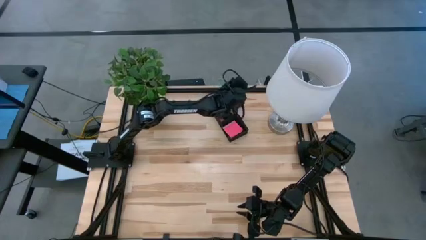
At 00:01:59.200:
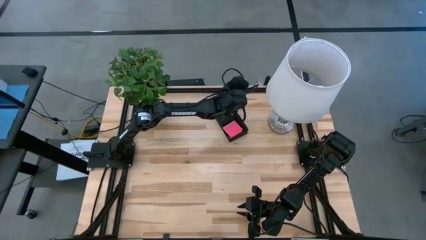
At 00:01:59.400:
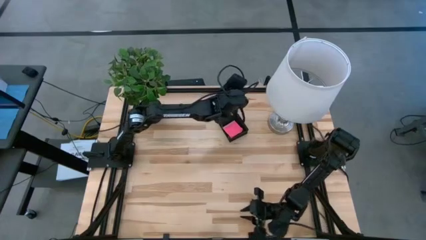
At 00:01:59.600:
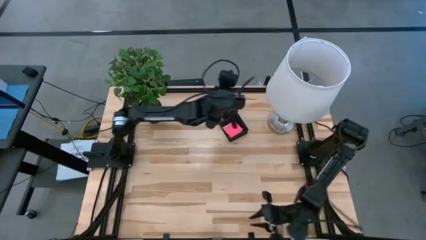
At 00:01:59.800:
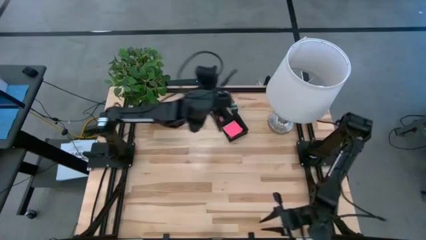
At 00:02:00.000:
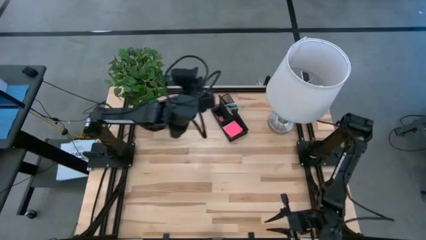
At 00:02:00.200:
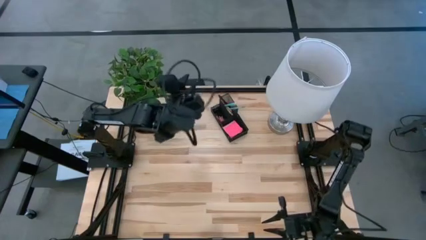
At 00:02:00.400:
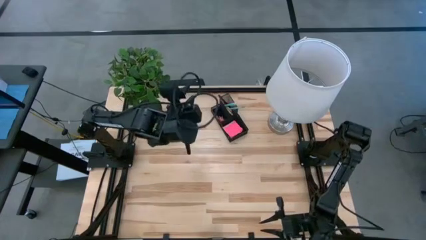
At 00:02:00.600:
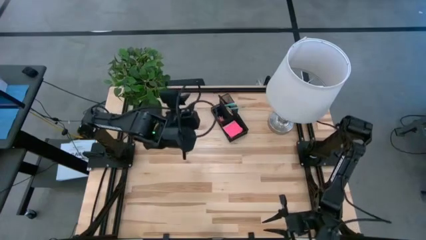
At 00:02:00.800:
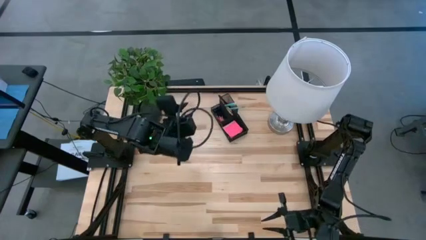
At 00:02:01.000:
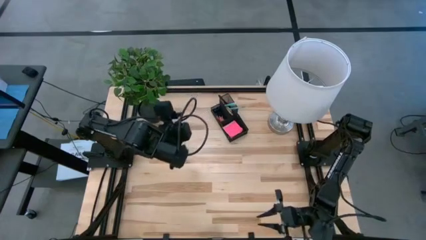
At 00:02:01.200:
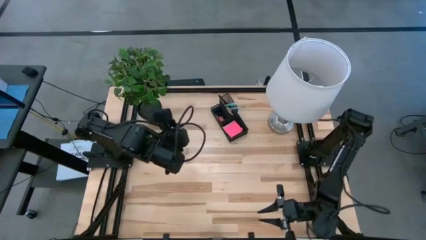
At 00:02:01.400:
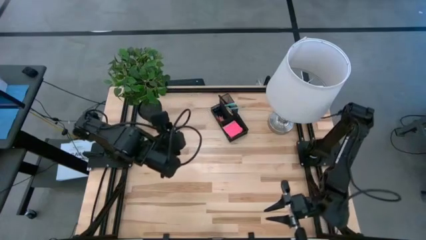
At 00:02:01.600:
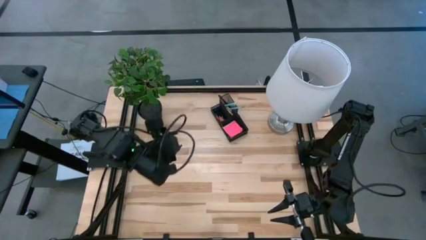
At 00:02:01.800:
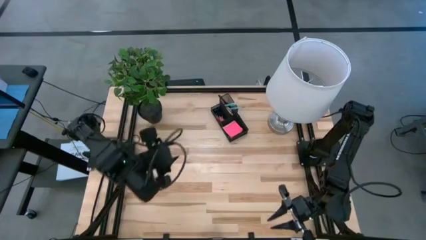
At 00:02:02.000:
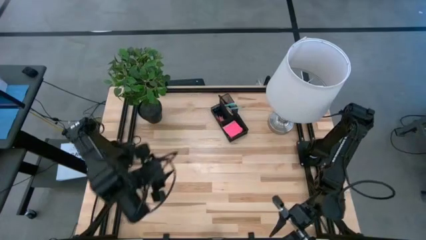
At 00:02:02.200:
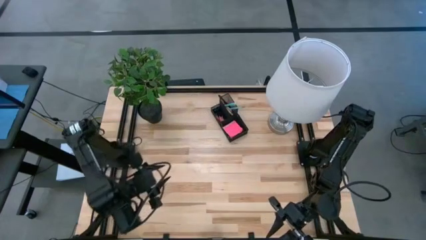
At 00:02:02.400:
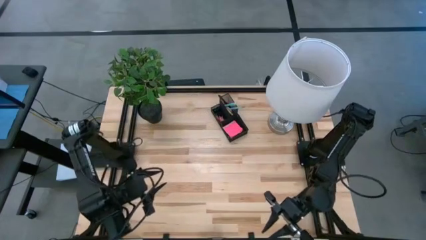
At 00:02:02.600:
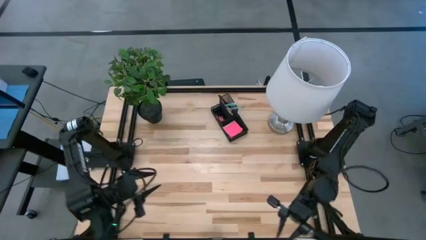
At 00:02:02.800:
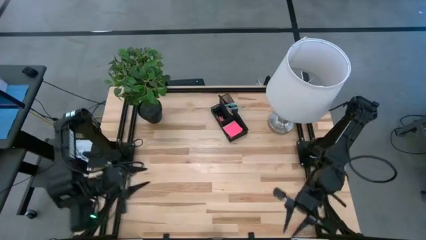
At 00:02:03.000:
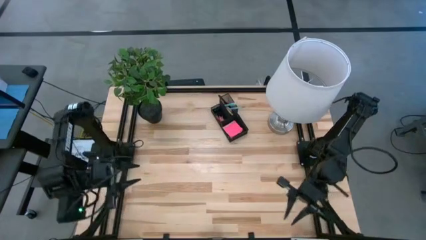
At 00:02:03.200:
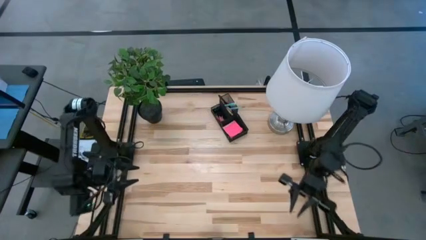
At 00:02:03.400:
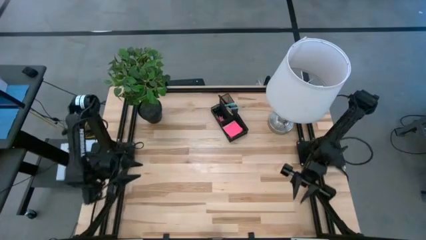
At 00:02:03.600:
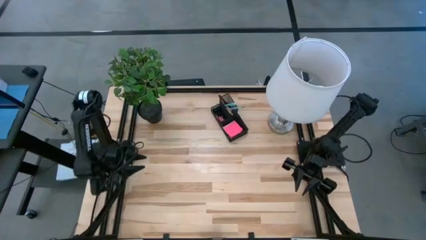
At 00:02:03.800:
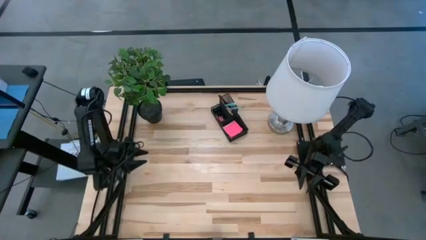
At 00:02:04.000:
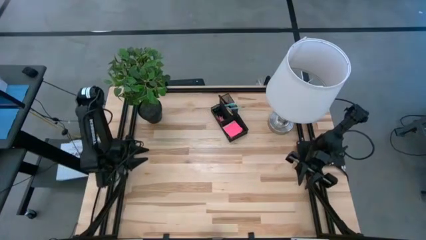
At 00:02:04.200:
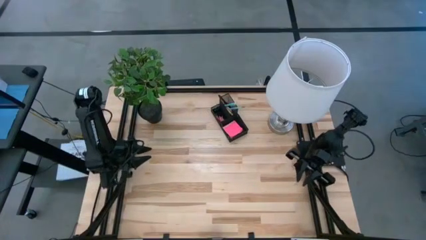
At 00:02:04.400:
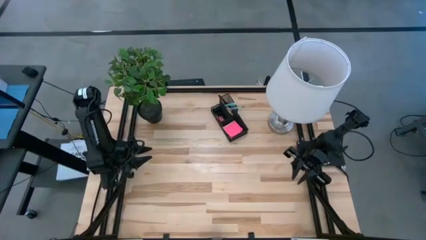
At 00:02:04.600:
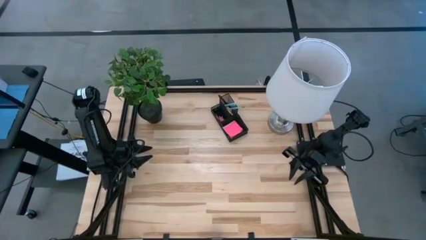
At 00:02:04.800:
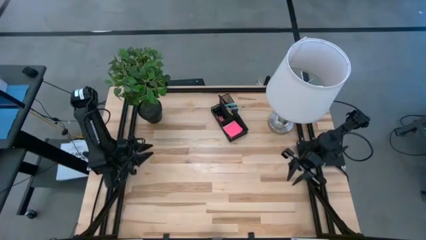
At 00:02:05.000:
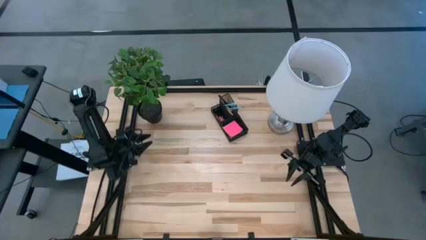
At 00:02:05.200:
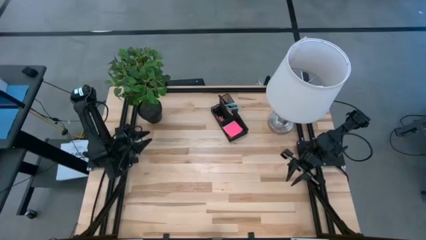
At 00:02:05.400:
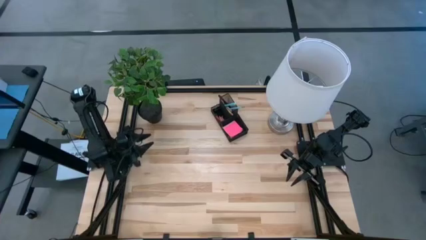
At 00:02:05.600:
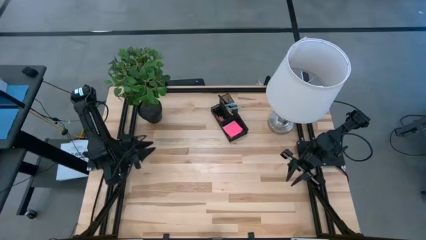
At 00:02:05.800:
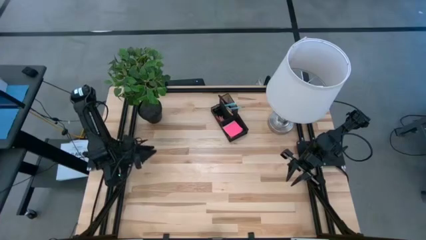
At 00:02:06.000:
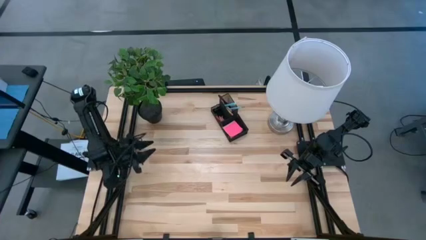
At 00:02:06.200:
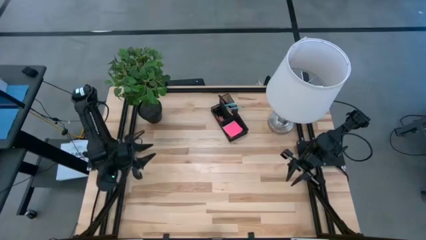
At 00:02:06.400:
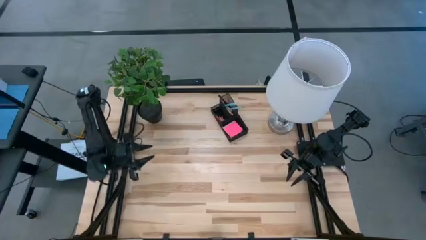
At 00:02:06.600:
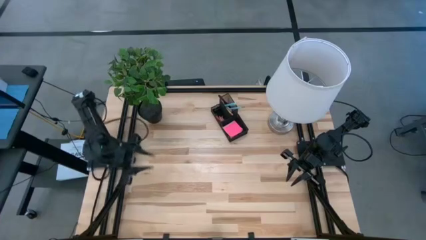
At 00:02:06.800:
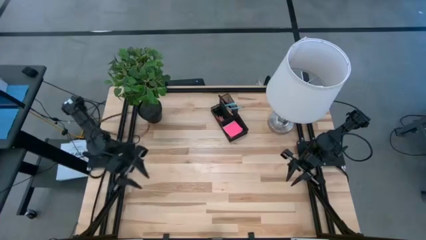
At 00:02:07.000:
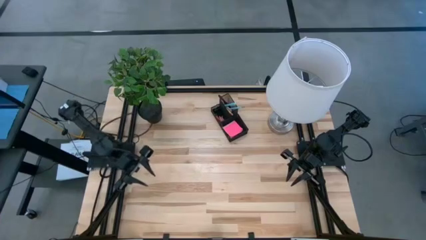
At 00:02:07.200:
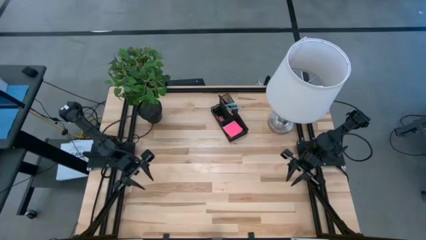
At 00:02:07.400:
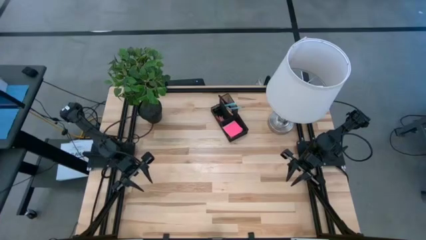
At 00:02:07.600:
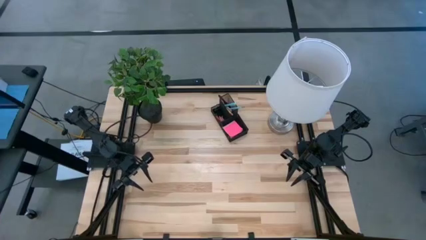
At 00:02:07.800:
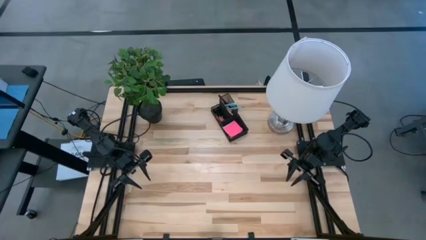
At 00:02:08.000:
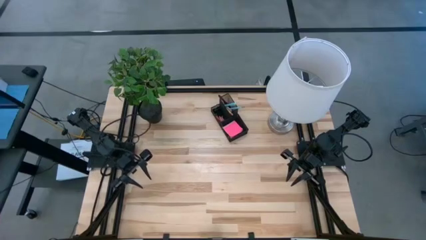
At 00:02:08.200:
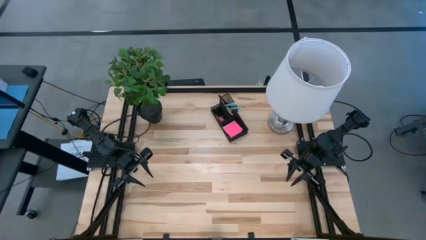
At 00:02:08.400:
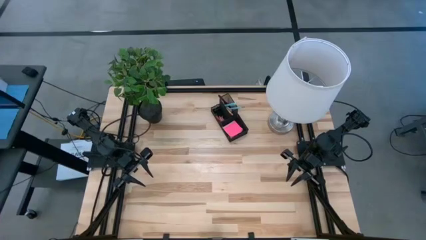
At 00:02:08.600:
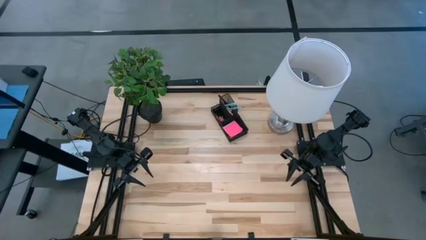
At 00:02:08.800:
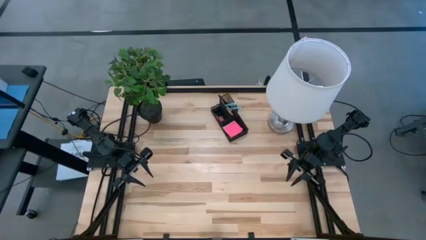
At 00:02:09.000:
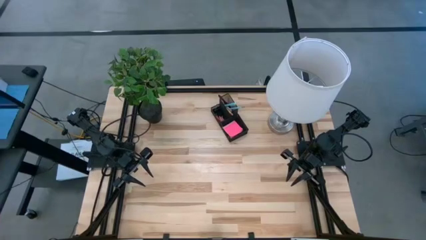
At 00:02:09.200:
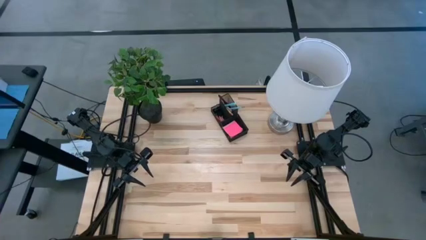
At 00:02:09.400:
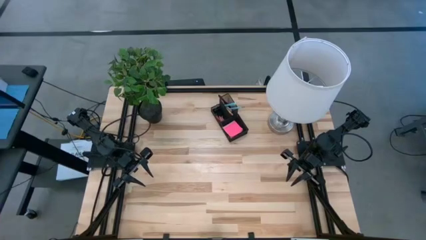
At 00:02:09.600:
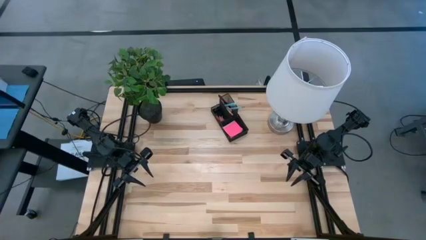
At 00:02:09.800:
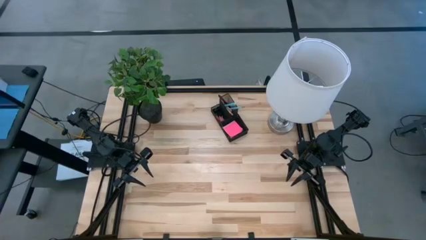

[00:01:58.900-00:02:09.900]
Task: Pick and place office supplies into organizer
Return to Home Position

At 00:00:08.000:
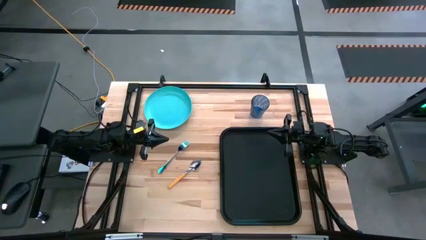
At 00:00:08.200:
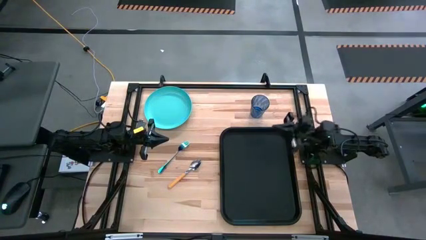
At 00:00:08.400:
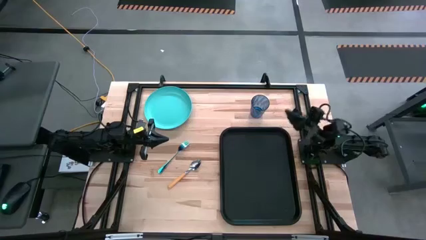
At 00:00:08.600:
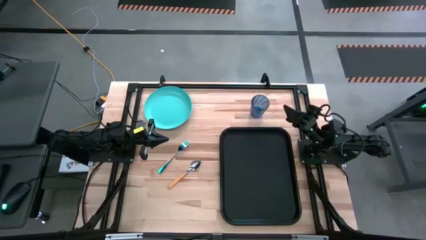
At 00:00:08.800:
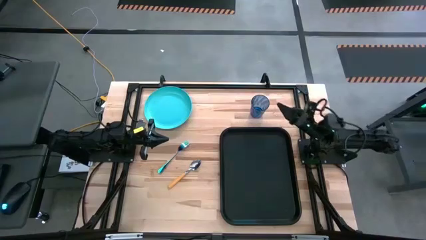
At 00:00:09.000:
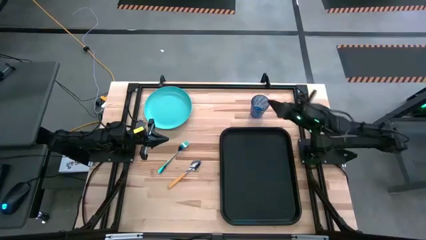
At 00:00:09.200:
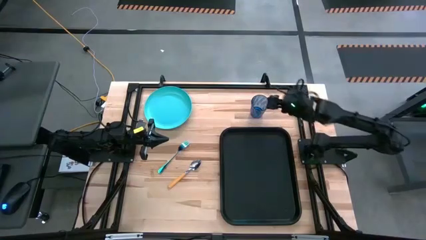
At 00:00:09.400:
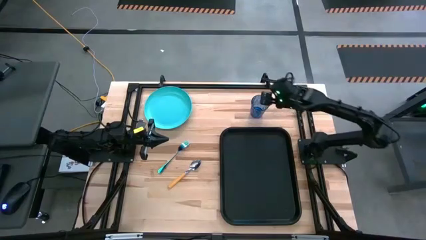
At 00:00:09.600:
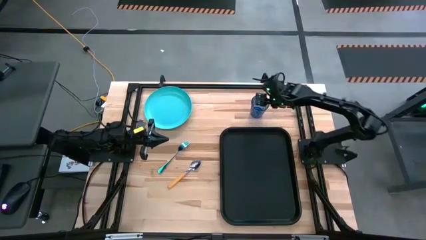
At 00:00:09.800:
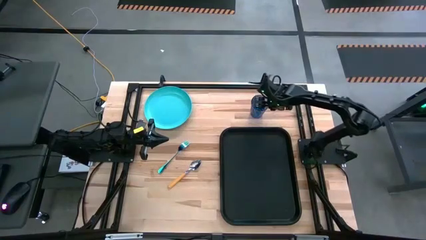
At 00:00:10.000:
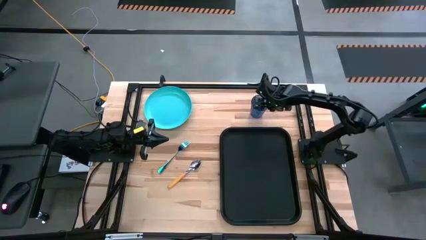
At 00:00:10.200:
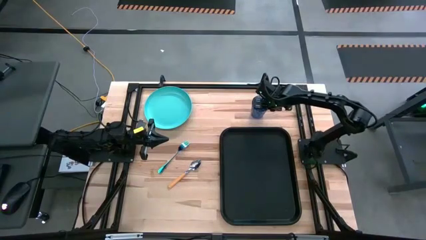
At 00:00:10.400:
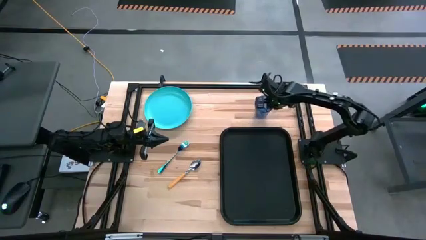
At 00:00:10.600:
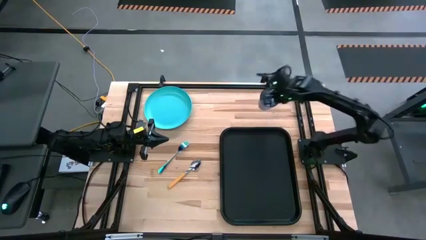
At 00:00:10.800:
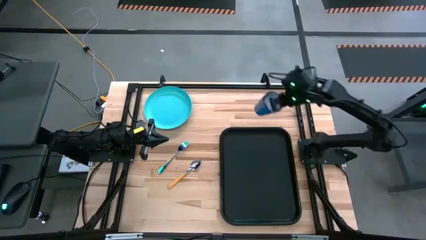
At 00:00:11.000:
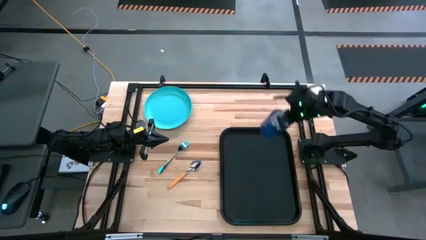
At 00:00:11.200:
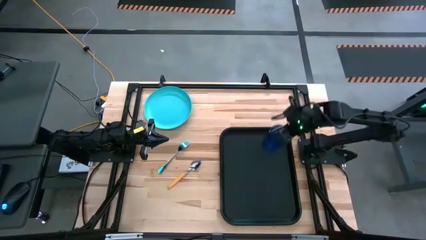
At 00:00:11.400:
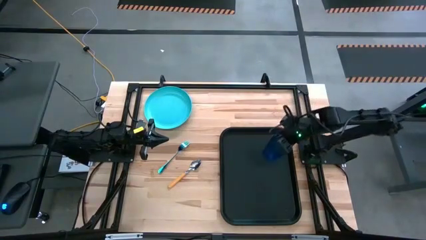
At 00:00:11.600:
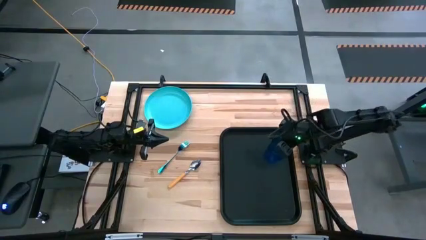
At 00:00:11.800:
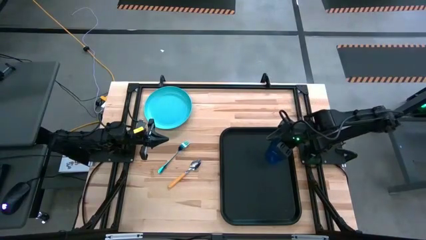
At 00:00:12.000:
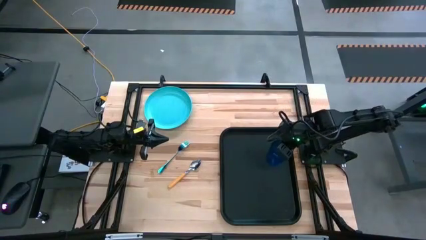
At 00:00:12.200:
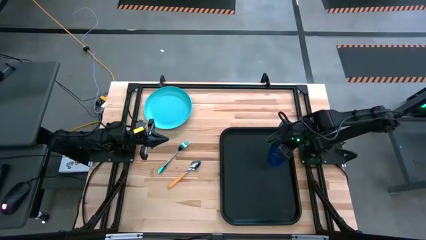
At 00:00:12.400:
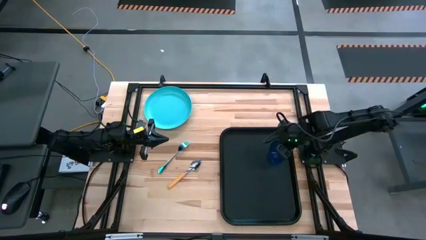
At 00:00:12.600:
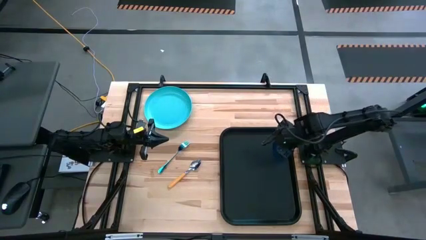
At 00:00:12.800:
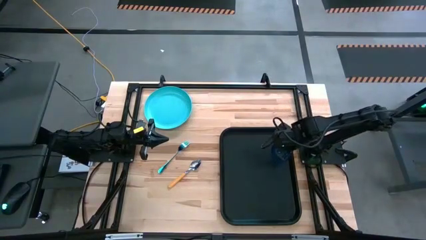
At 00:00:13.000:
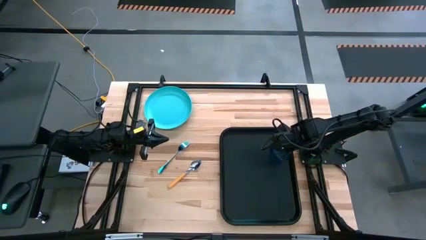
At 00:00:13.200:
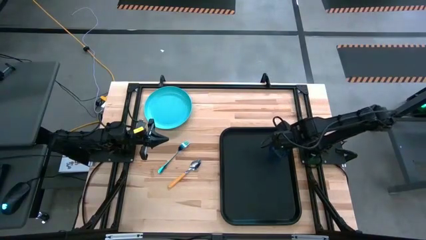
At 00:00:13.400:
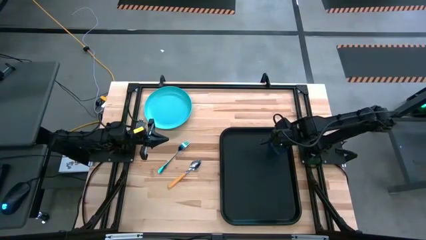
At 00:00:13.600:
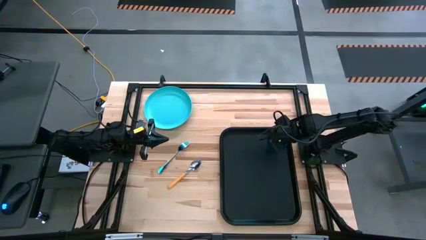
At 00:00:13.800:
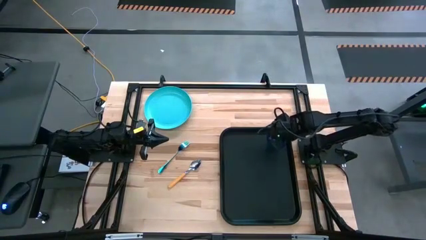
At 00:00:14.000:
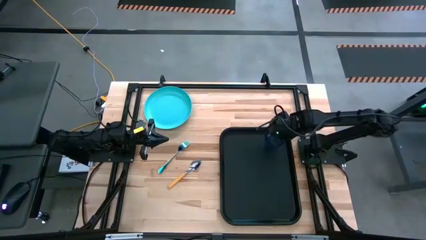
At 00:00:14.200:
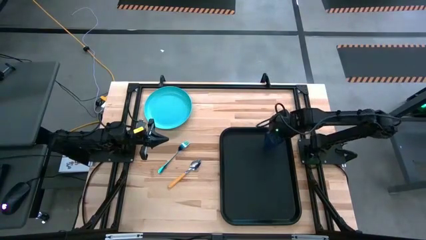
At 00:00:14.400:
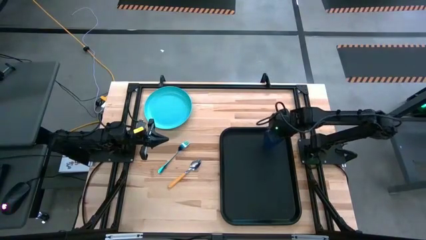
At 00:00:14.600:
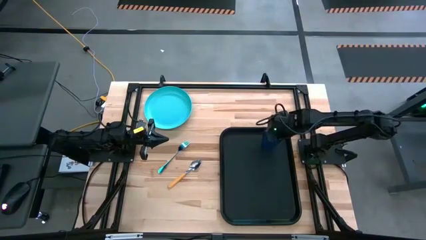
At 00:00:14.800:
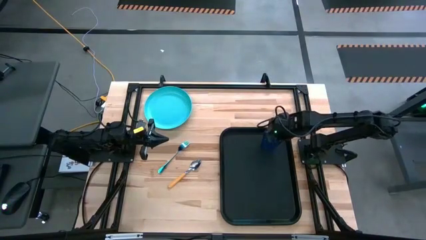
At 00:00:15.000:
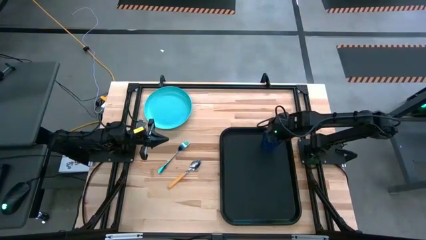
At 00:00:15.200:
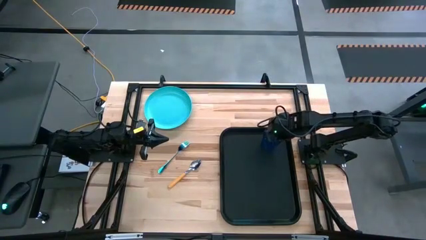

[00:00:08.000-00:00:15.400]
Task: Pick and place plate/cup/fork/spoon on tray
Put the blue glass on the top left of the black serving tray
